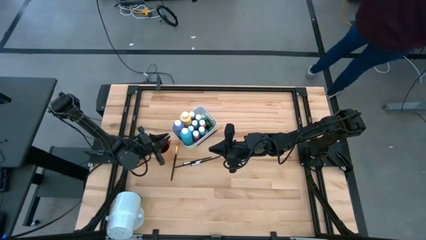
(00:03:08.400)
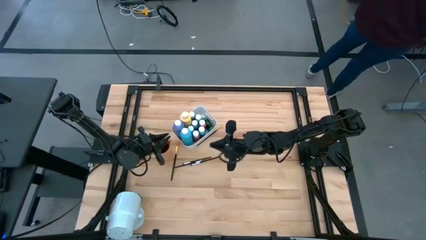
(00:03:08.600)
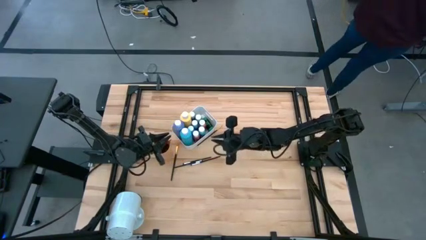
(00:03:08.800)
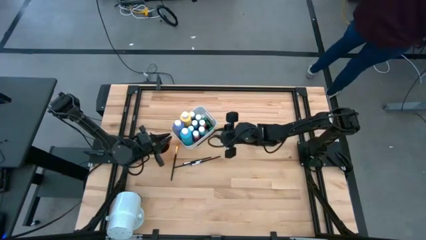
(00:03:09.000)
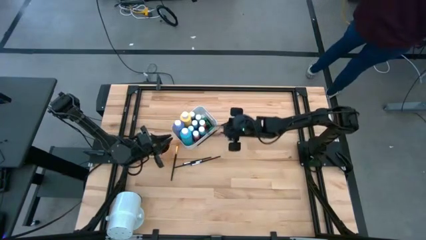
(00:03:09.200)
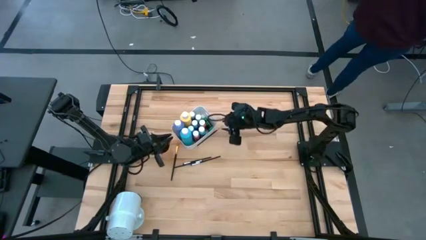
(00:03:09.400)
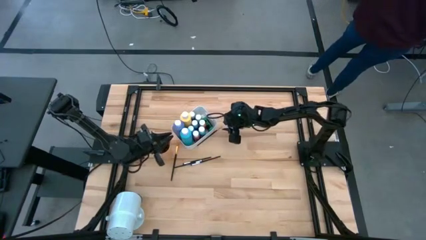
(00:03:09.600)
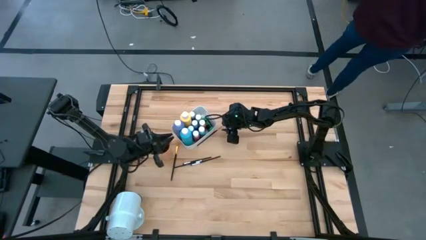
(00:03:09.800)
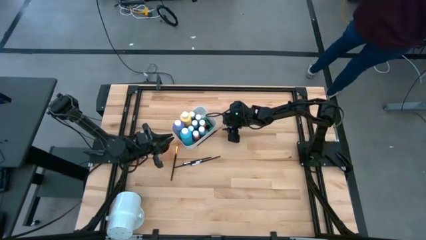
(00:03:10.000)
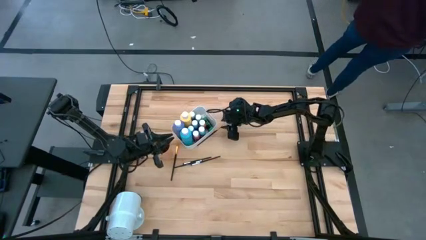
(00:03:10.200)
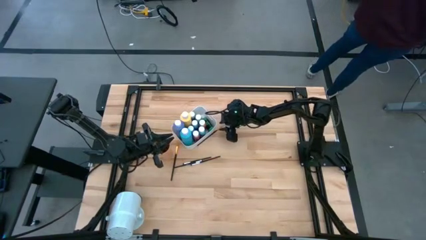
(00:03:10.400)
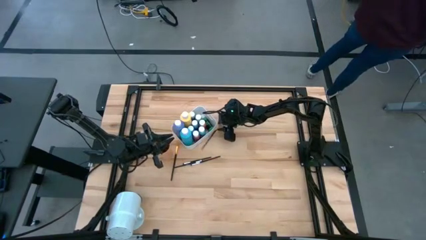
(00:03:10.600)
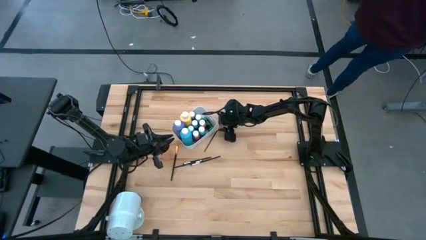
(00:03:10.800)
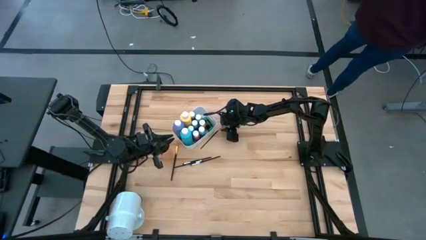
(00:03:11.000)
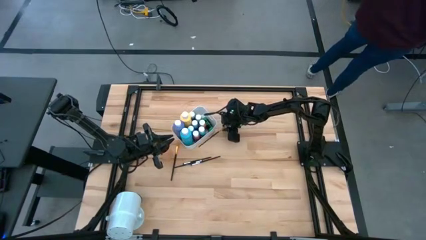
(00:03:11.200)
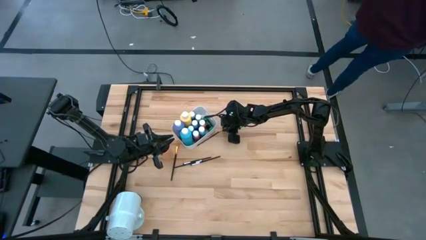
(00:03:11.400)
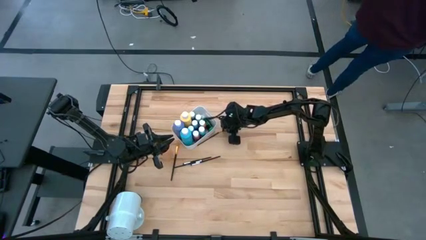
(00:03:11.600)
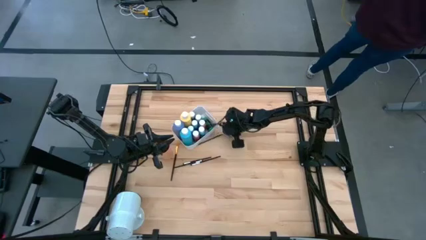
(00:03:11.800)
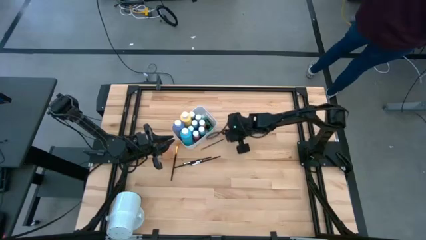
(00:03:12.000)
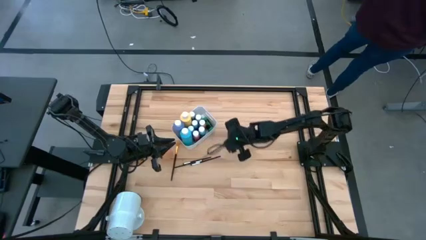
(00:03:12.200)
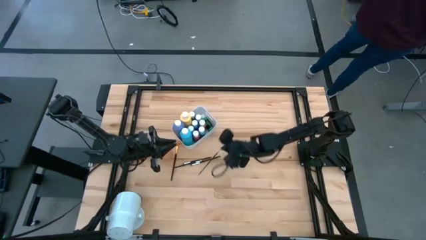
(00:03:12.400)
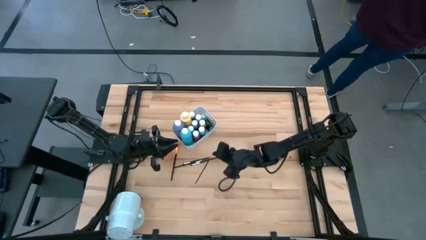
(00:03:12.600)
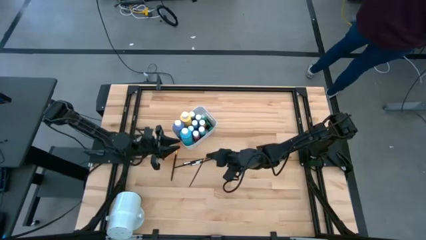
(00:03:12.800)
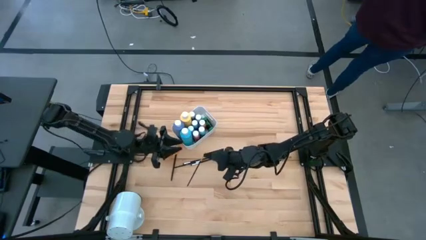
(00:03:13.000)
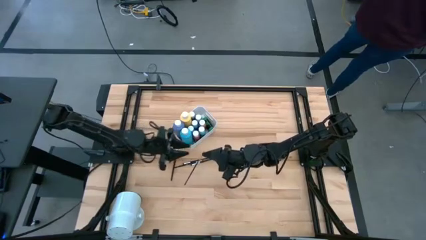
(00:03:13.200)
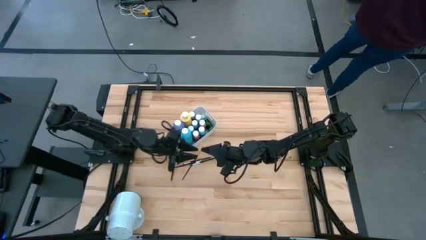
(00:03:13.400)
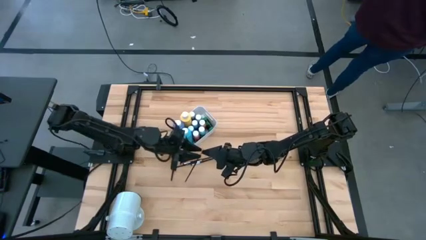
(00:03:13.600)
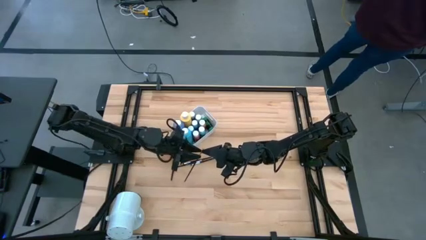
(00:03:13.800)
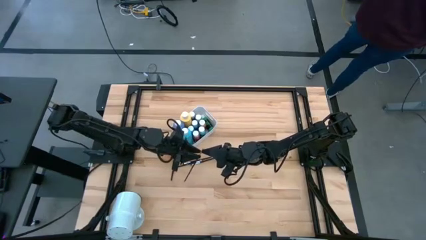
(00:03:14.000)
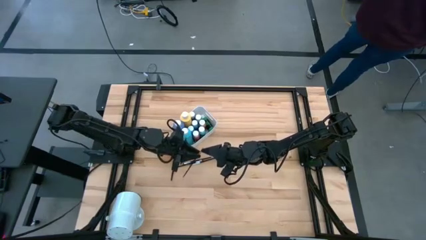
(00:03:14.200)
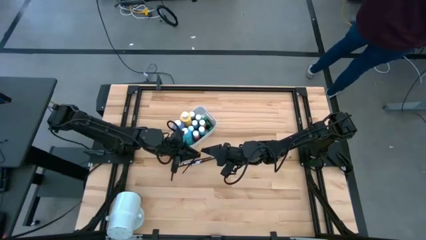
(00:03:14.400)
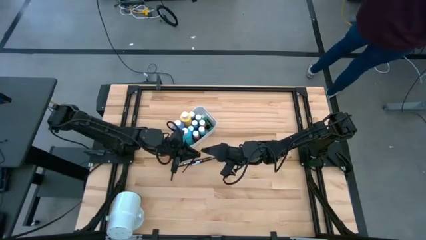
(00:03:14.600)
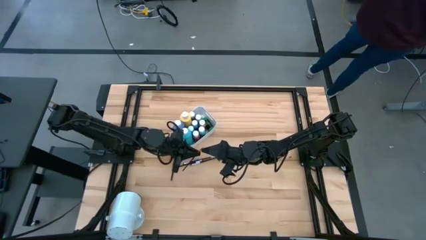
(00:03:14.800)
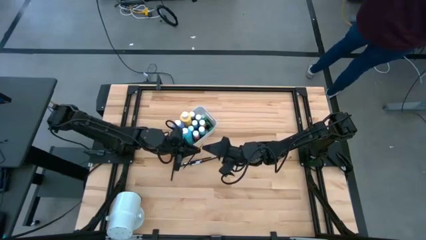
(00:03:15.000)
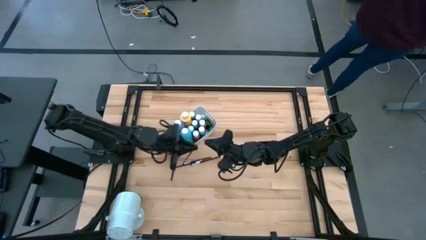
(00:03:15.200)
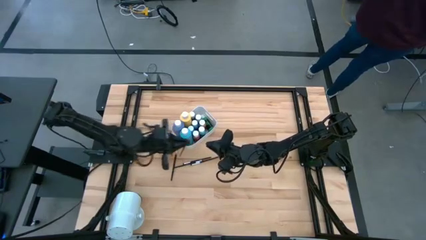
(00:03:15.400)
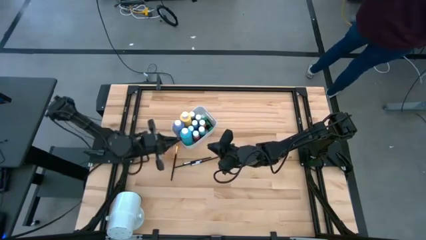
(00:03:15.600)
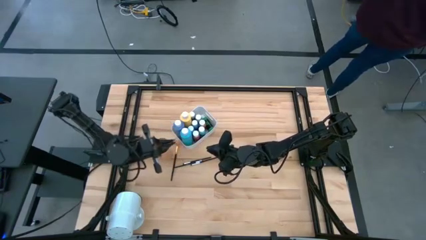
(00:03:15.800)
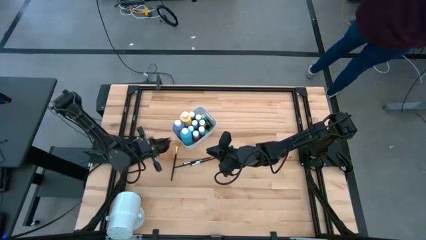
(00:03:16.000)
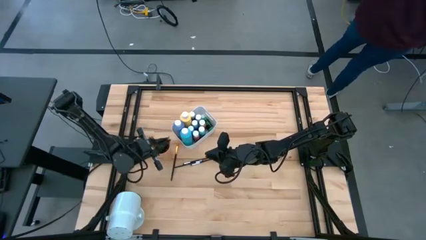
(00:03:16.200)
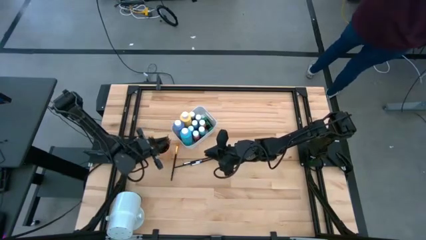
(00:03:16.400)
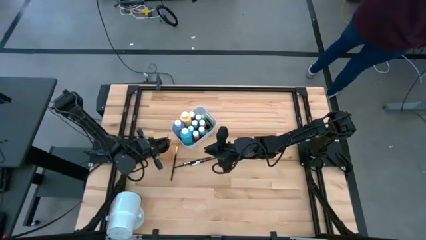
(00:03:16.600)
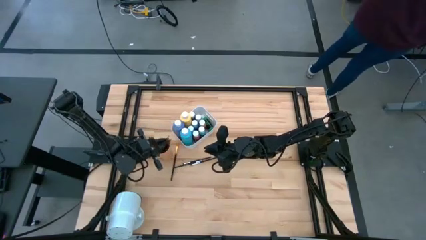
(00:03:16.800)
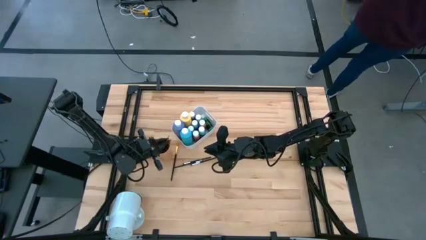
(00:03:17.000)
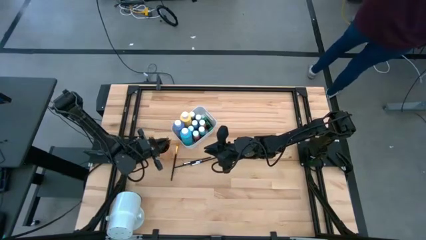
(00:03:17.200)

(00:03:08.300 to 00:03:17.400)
Task: Pick & Place Paint Supplies
Put the right black gold paintbrush into the orange cup

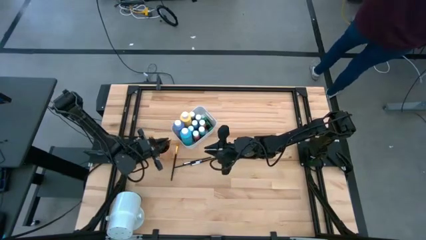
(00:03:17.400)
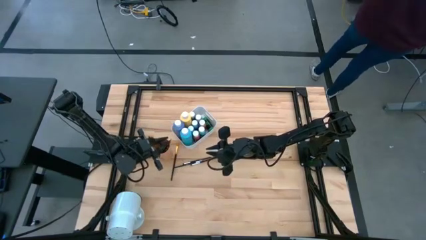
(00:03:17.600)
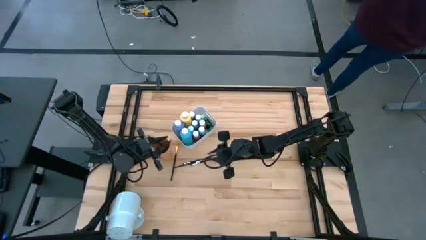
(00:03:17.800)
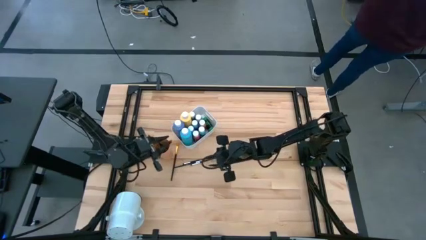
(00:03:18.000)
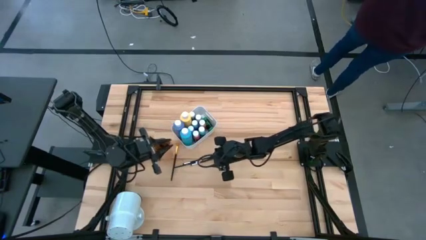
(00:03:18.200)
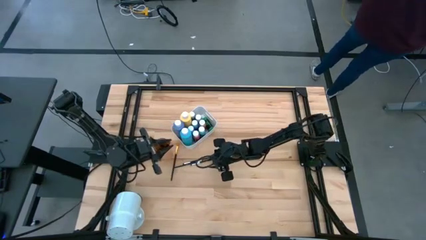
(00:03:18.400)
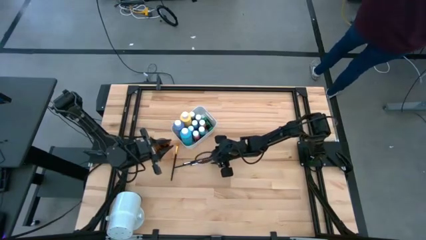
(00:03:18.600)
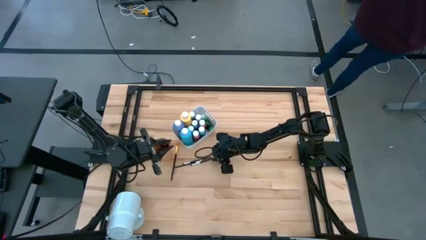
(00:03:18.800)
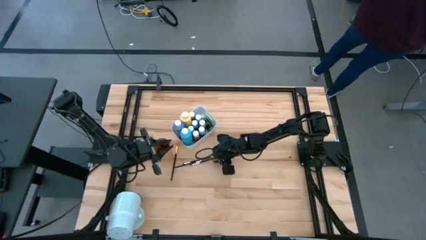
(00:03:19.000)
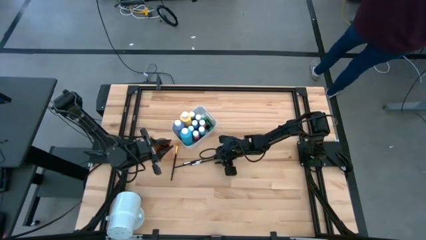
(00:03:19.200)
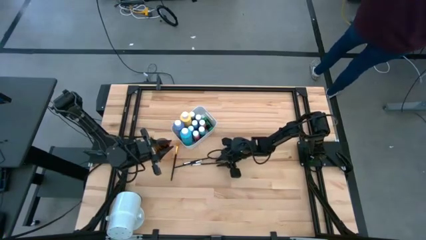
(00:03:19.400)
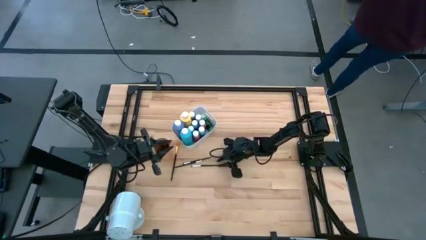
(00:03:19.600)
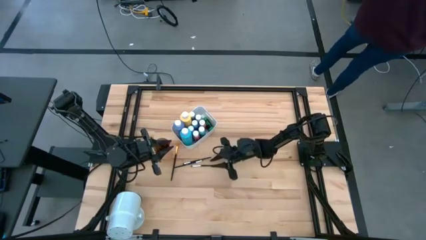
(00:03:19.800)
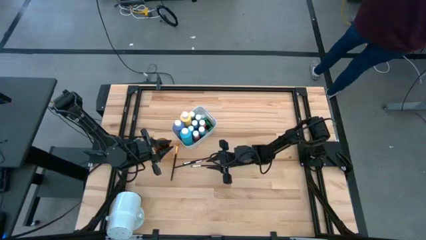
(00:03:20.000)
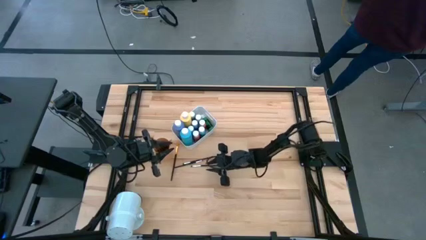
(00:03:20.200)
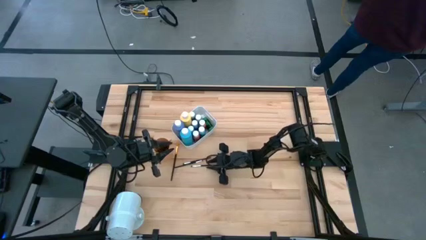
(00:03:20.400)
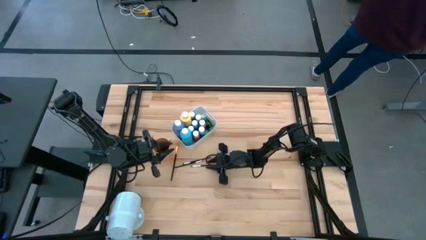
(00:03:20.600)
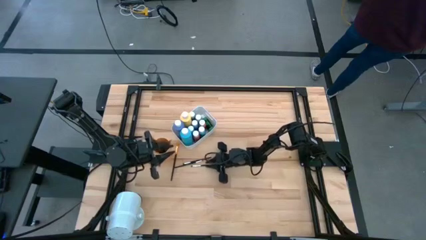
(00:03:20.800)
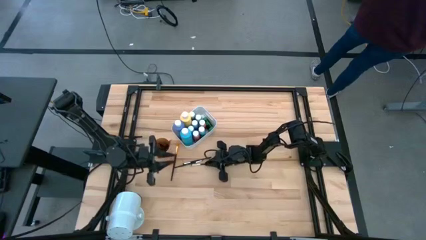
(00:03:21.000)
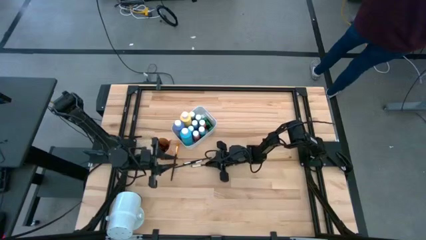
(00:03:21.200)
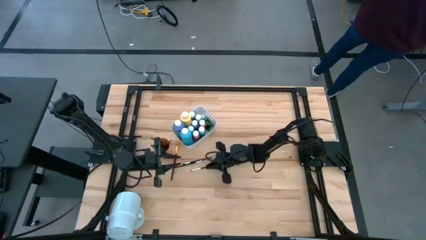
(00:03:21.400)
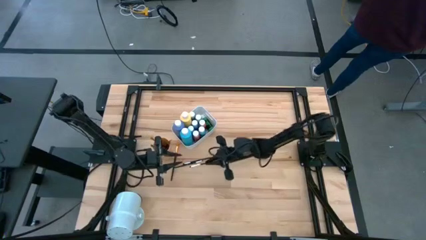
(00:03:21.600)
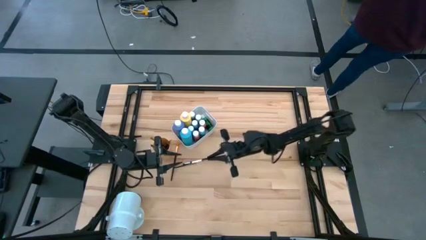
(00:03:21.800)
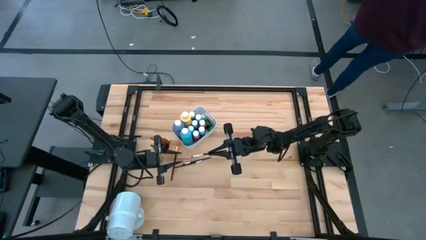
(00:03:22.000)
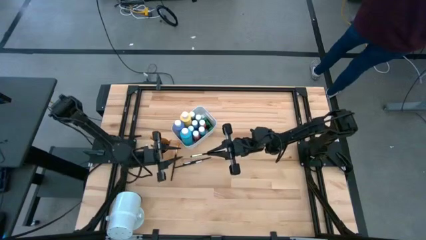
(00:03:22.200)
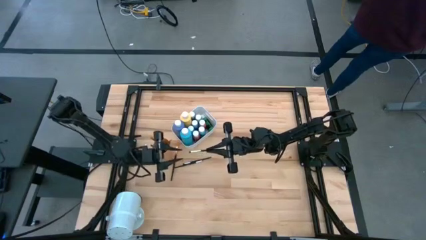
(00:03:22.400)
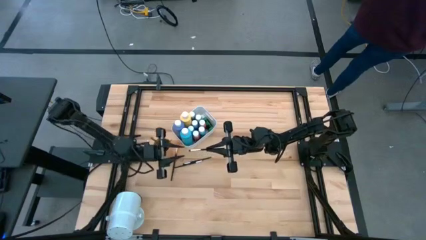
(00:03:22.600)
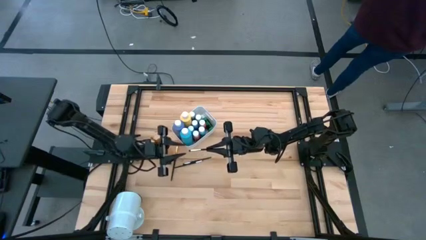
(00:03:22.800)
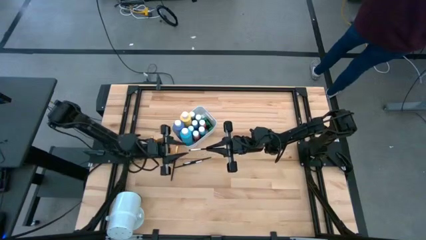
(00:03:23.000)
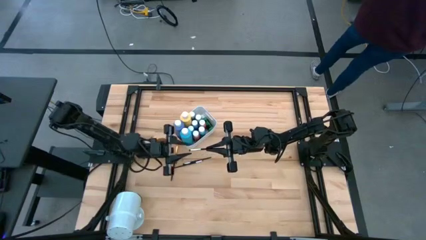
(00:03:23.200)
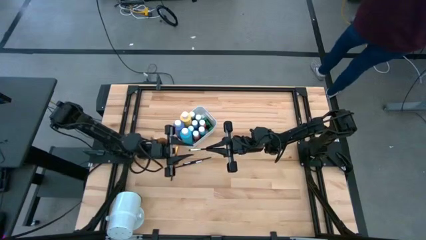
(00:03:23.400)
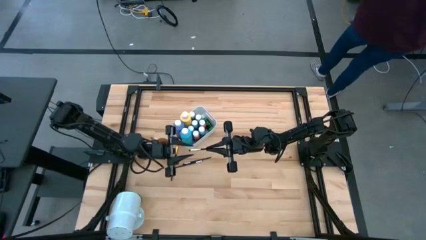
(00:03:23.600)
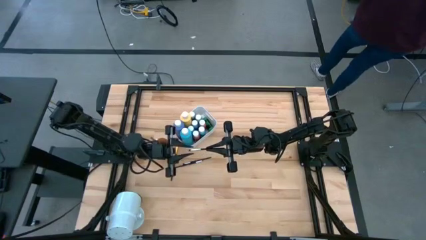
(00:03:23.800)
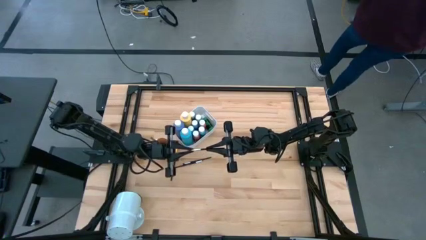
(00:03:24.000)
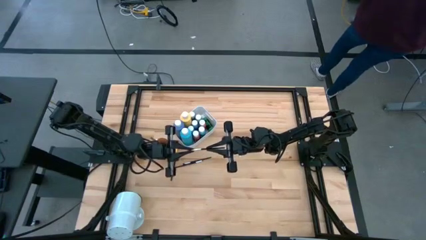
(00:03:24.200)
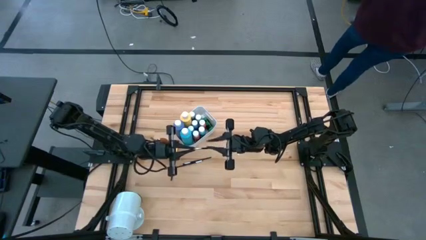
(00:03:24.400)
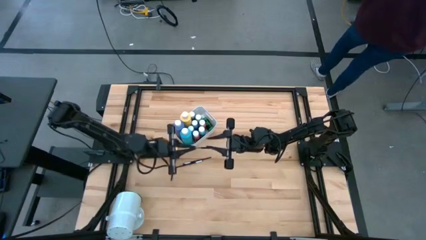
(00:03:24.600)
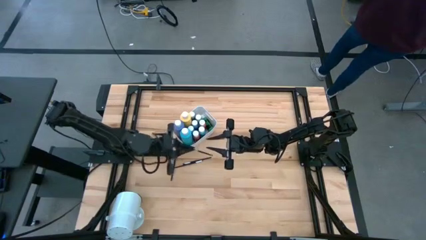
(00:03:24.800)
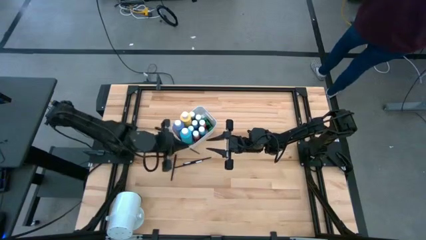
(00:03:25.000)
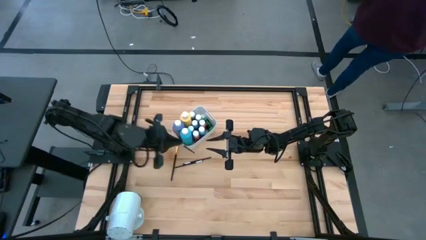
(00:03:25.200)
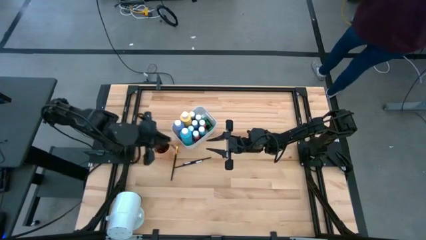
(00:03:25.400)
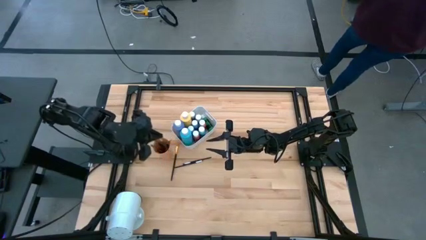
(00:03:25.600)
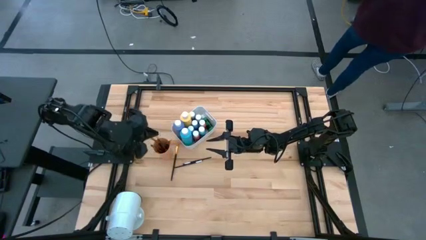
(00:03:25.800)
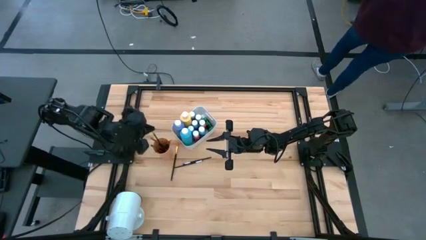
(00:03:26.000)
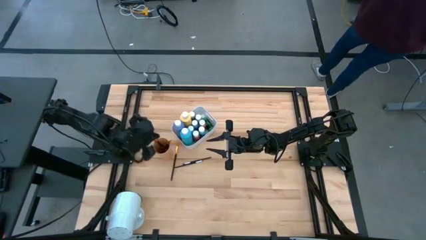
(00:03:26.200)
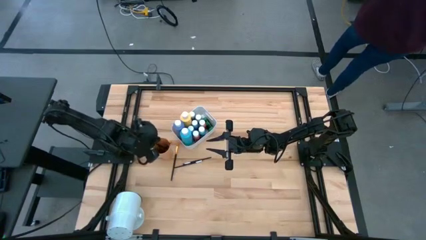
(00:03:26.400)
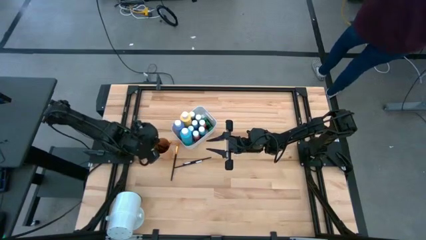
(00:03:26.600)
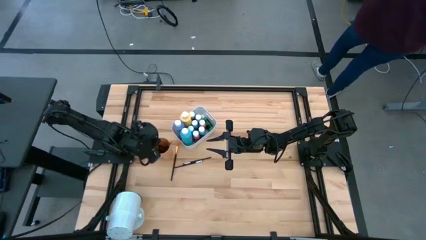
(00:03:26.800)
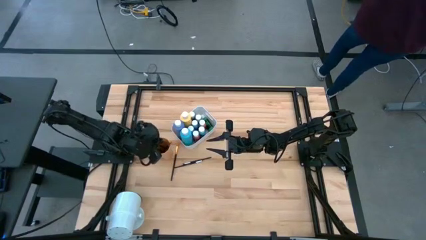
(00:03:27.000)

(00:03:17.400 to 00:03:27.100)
Put the bottom black silver paintbrush into the orange cup
